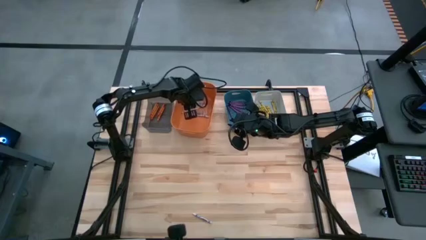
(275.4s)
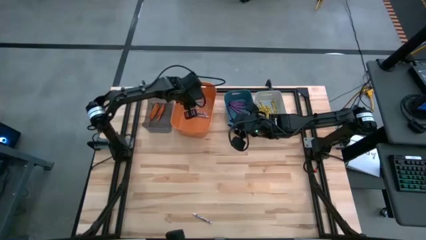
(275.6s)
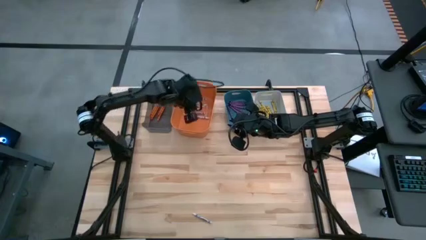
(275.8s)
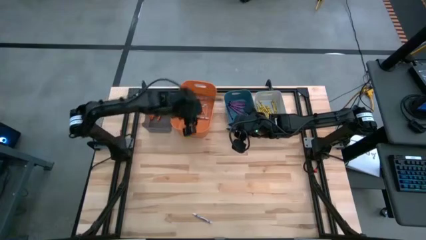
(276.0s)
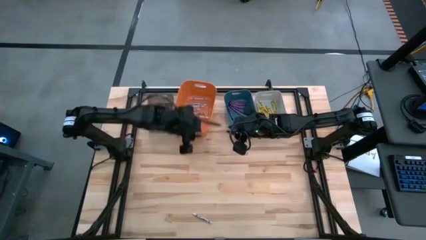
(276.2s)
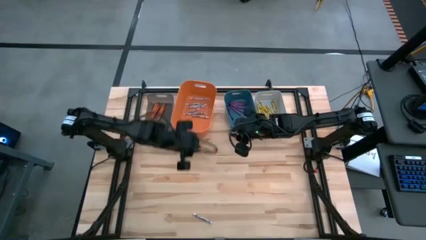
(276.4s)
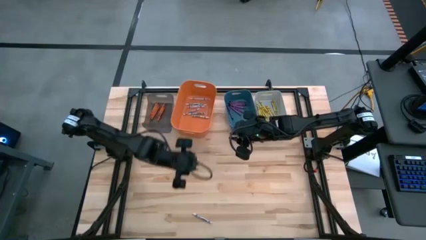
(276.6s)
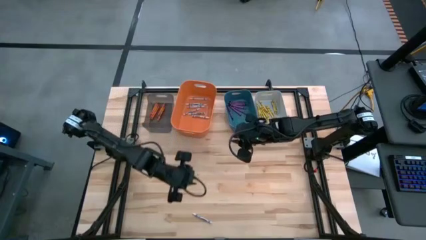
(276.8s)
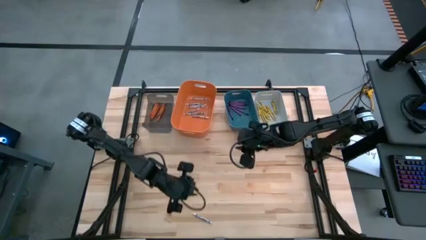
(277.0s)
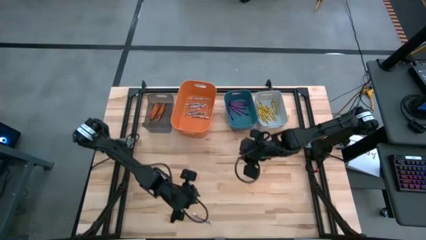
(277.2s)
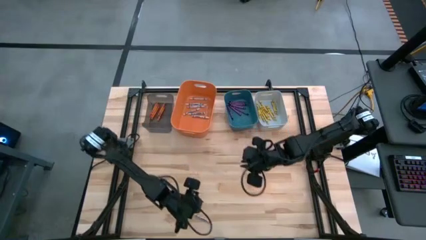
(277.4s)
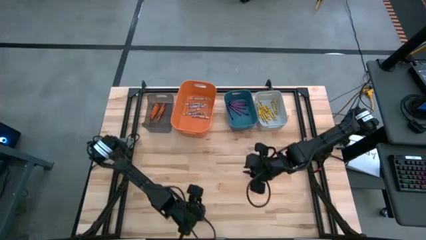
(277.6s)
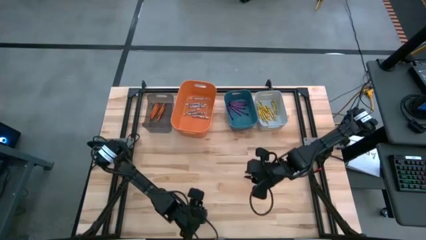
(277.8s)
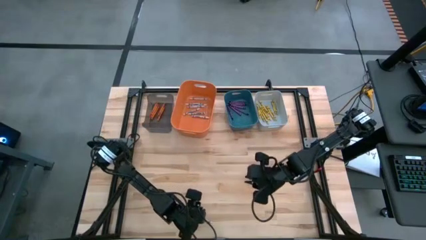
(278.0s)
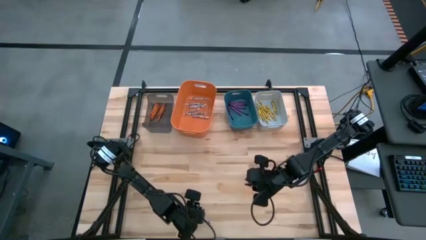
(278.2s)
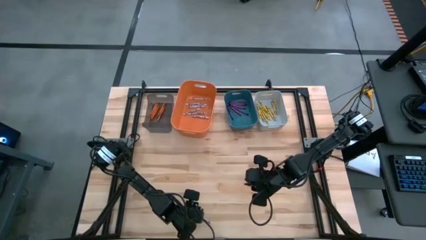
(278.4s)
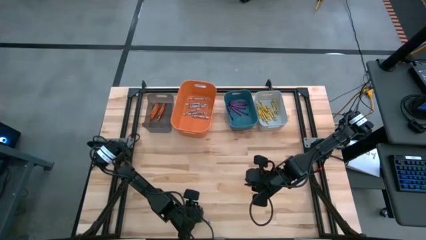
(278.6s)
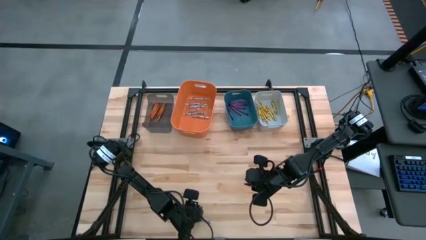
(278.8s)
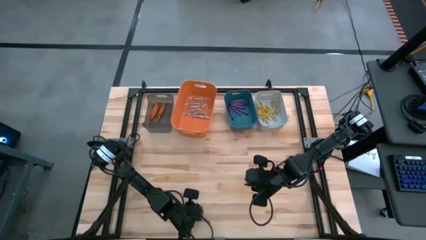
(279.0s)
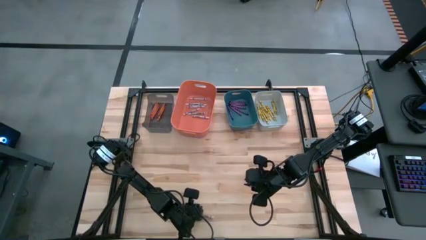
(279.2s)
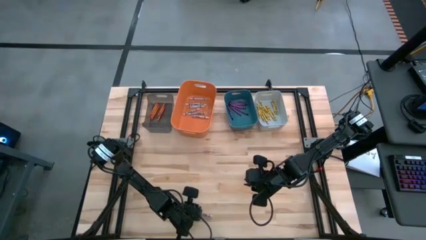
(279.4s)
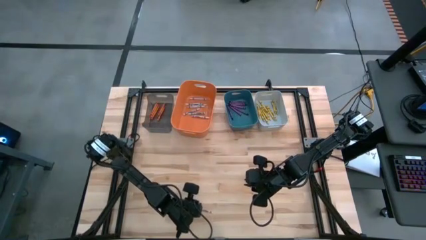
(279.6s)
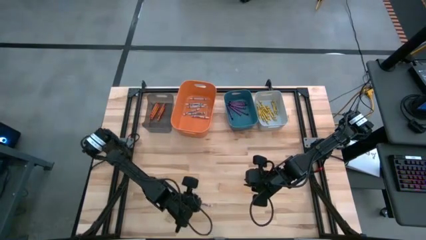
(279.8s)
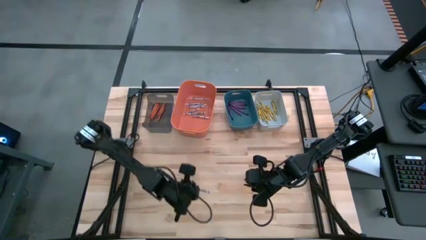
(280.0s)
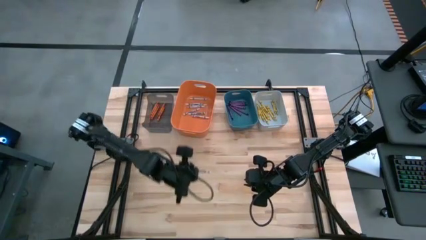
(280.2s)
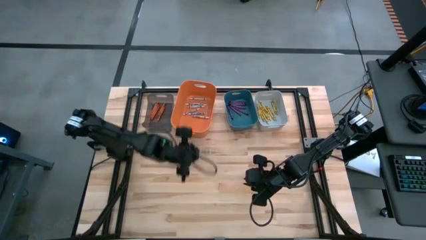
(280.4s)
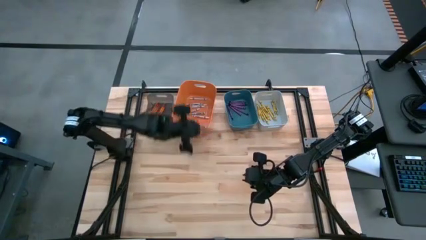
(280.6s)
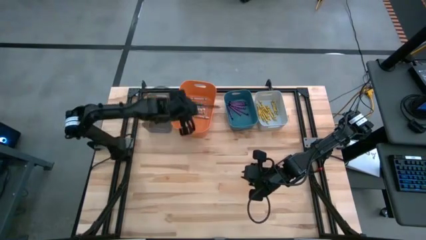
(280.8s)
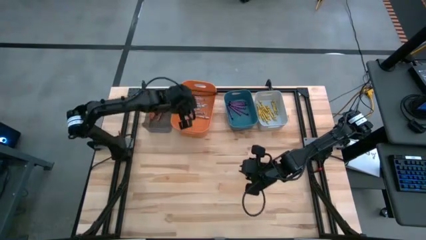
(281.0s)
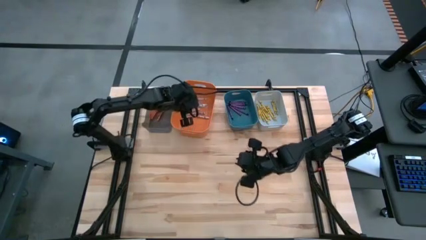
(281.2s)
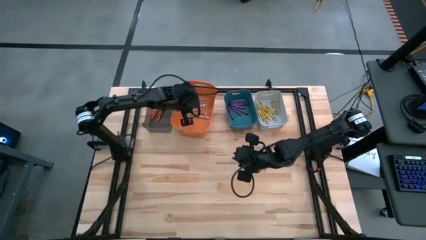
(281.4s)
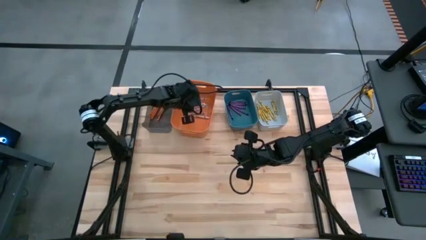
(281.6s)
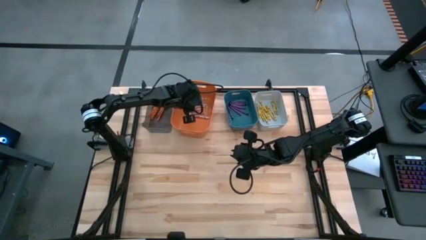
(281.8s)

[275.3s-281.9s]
Task: Sort crayons
Put the white crayon into the orange bin

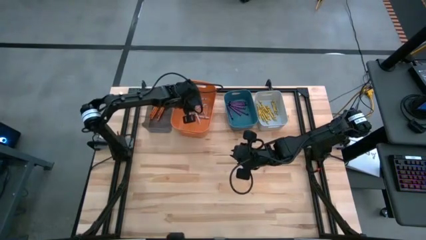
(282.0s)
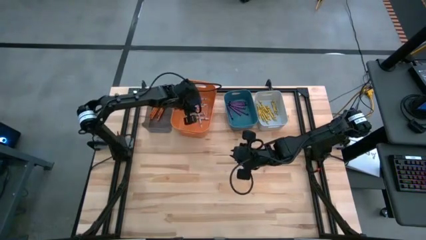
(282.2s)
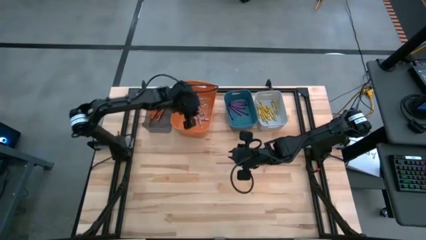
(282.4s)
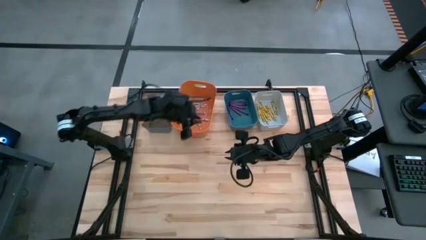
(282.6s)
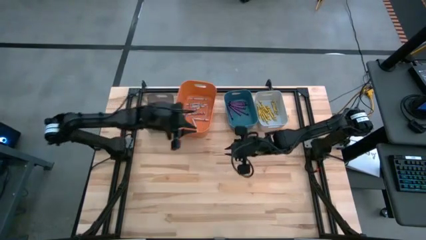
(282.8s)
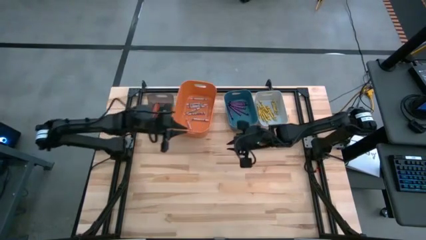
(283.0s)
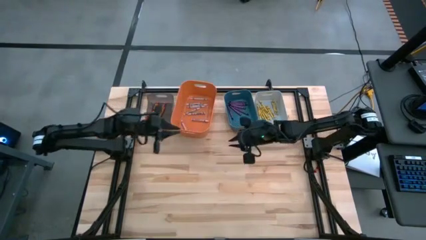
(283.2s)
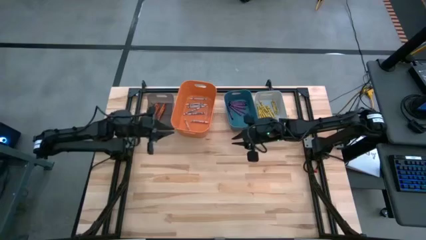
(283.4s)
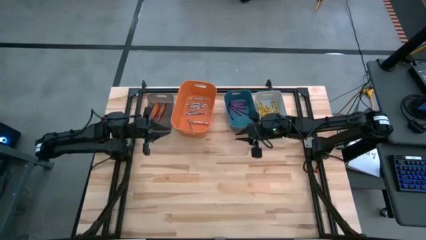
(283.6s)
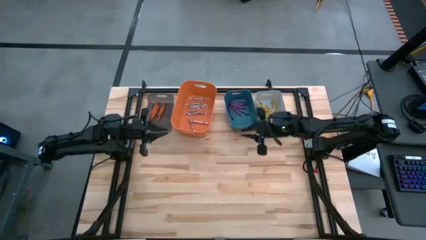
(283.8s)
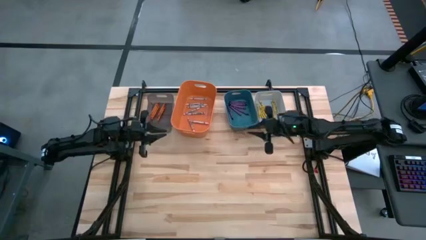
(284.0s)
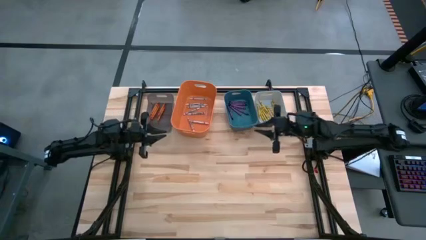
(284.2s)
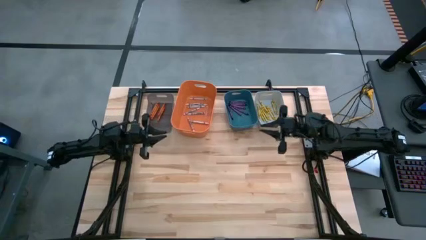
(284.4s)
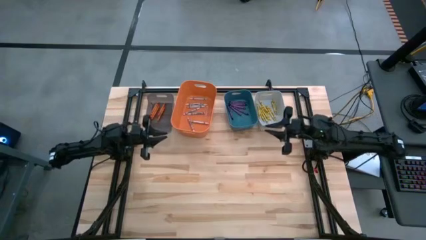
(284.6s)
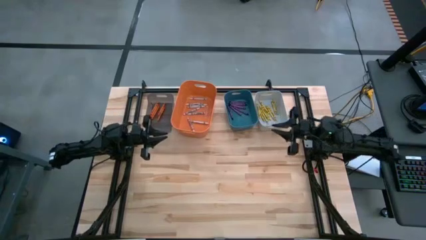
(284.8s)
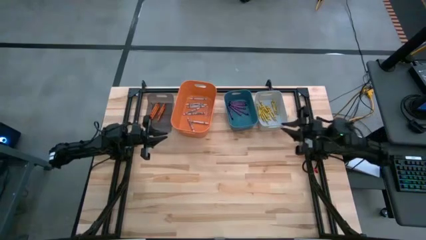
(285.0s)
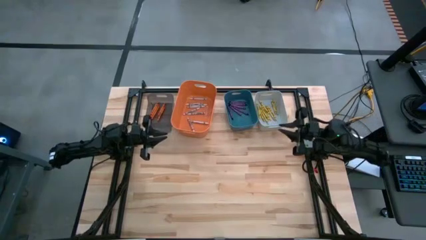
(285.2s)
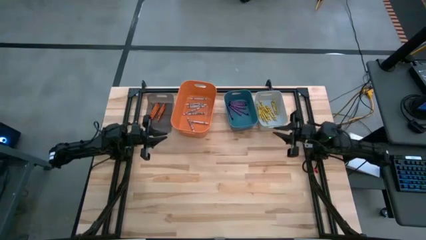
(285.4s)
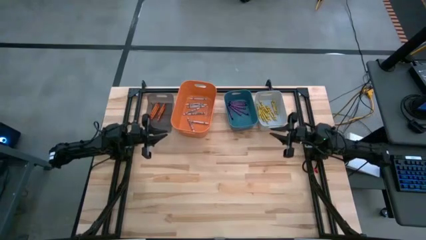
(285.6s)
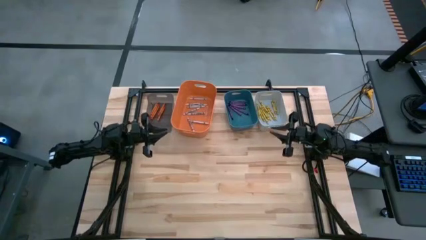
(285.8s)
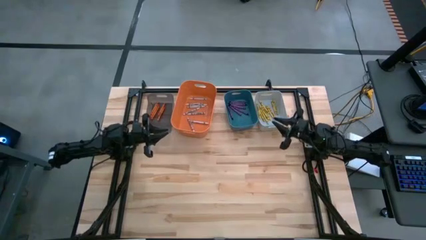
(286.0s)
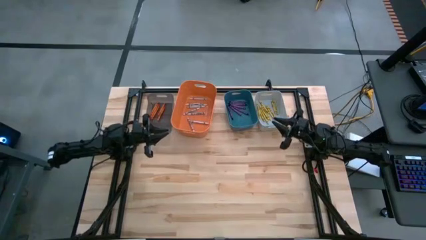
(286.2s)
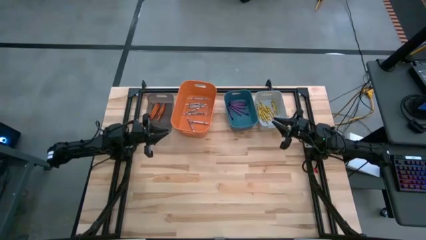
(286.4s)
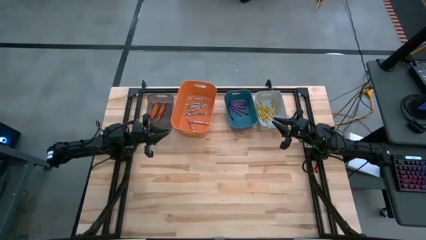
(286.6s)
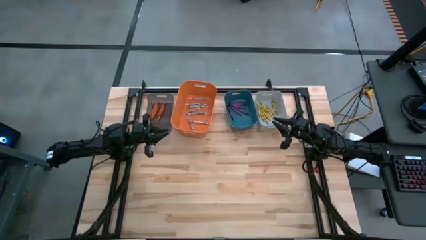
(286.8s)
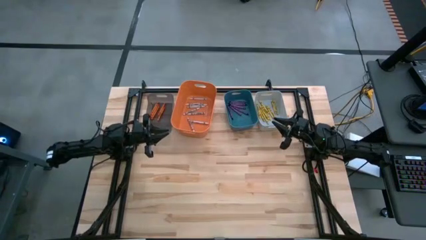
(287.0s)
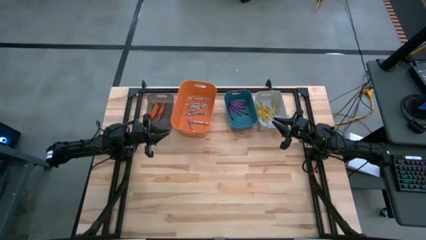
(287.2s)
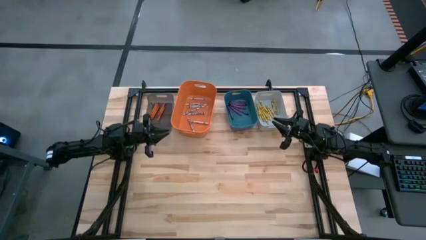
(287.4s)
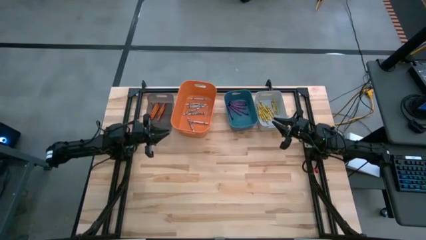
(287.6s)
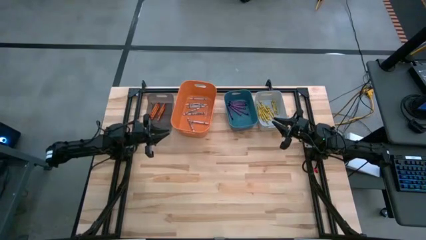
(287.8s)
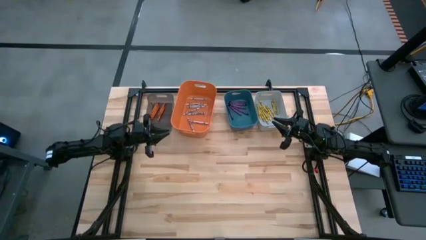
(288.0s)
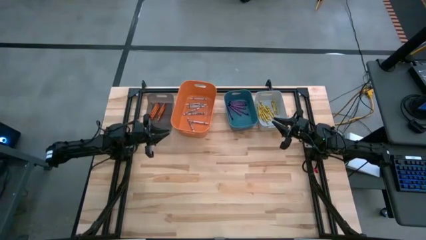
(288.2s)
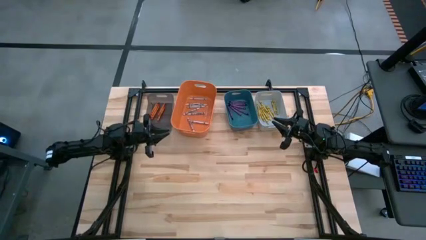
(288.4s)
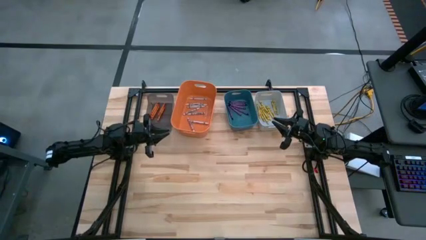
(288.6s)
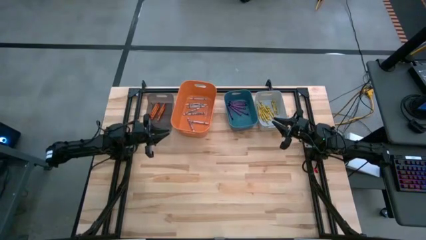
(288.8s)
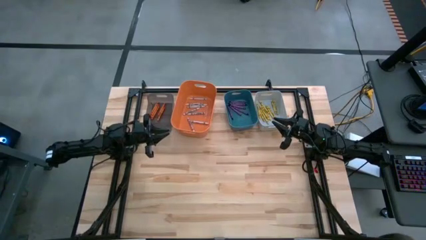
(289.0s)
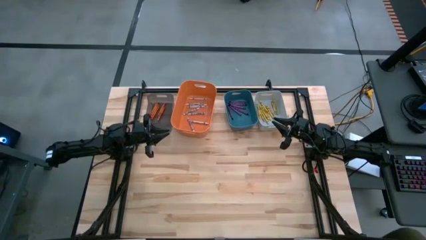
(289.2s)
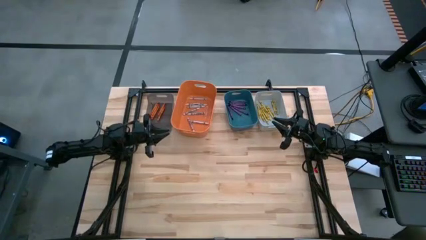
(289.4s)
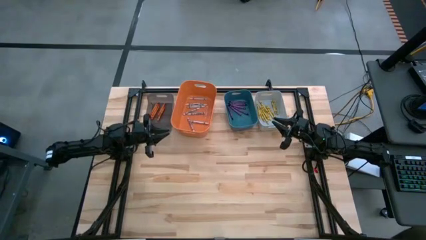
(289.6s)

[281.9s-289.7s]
Return to Home Position
